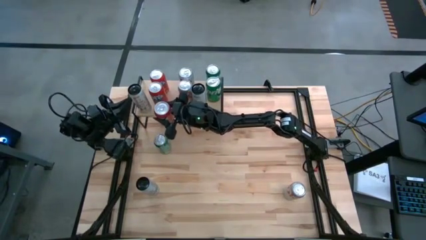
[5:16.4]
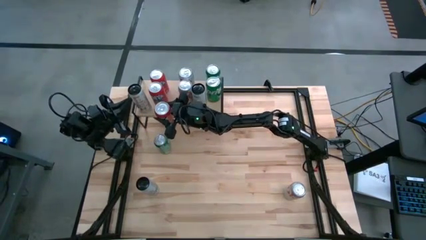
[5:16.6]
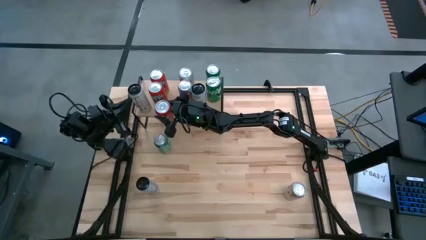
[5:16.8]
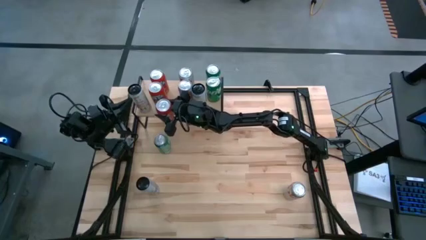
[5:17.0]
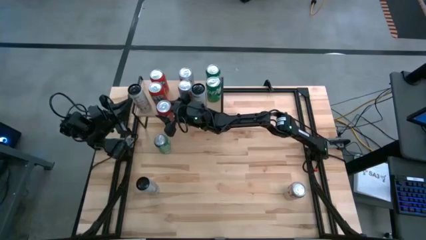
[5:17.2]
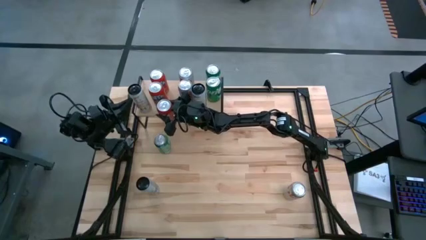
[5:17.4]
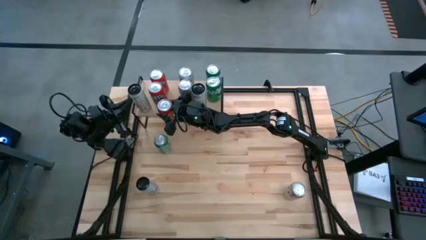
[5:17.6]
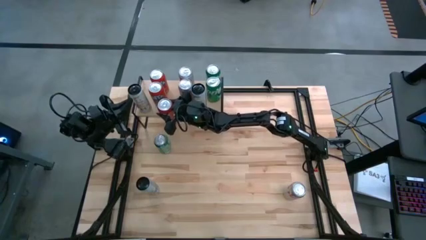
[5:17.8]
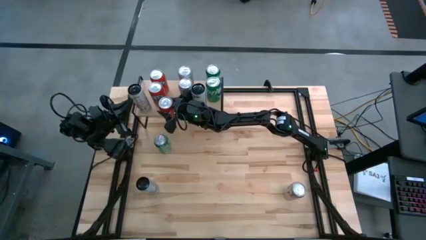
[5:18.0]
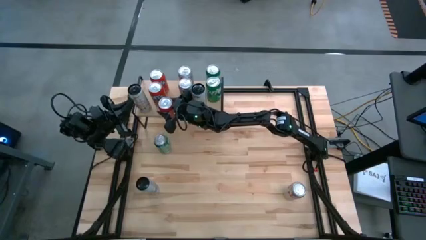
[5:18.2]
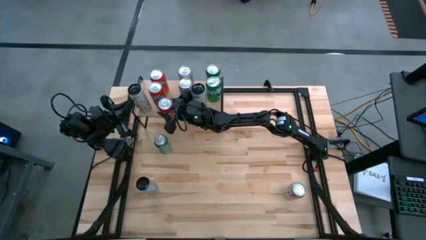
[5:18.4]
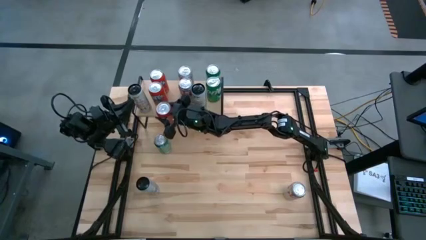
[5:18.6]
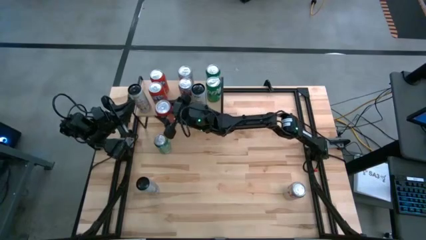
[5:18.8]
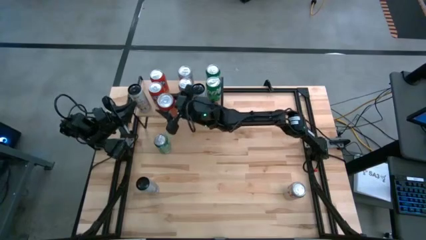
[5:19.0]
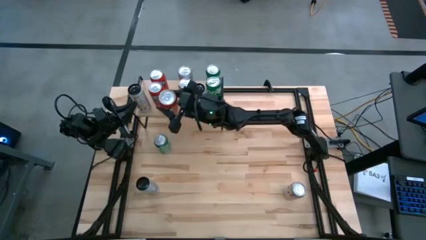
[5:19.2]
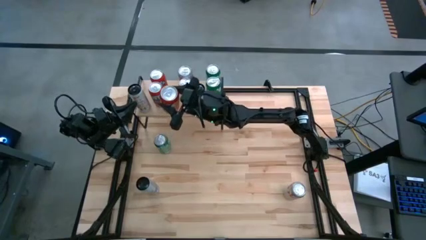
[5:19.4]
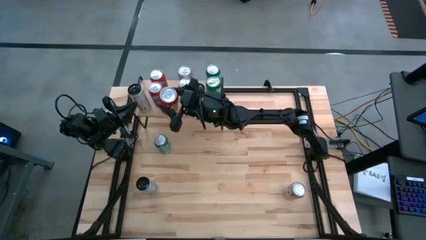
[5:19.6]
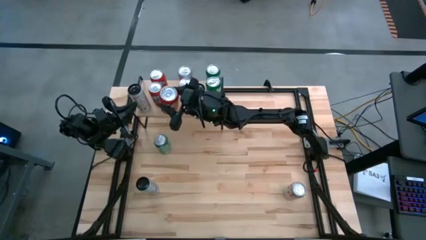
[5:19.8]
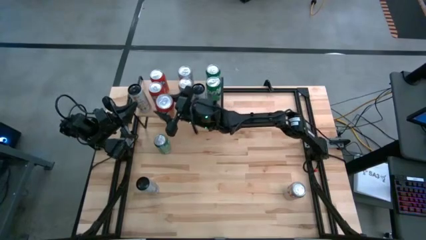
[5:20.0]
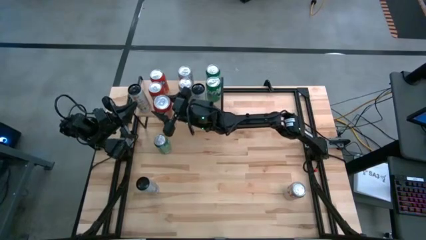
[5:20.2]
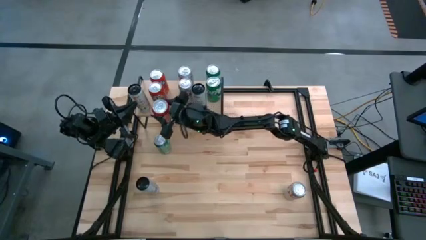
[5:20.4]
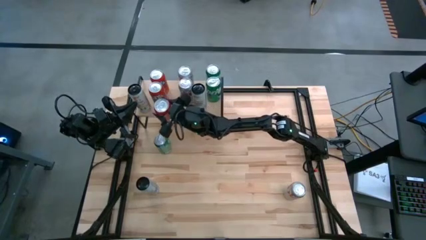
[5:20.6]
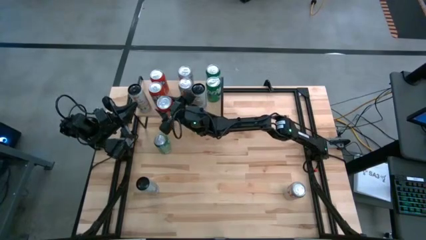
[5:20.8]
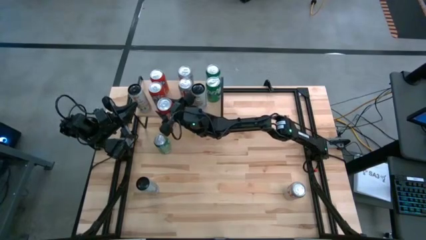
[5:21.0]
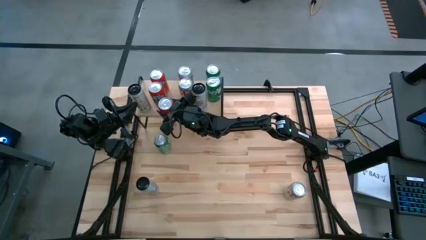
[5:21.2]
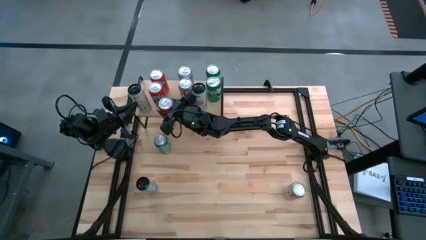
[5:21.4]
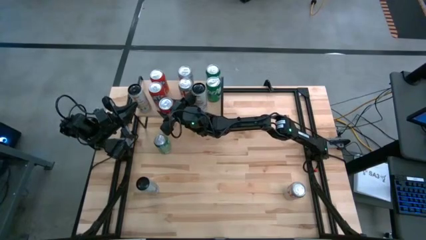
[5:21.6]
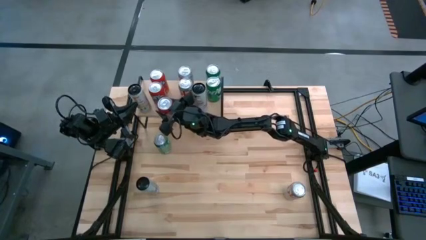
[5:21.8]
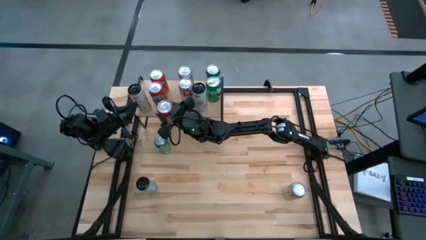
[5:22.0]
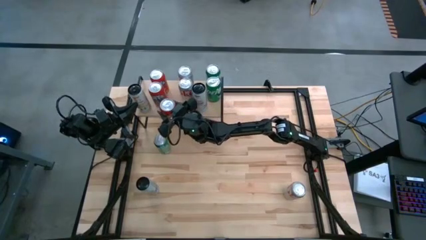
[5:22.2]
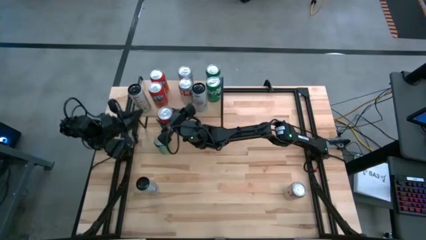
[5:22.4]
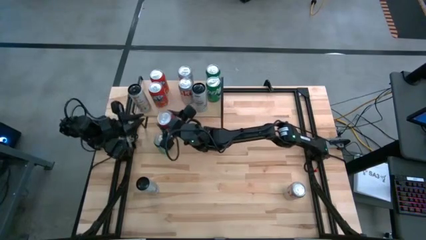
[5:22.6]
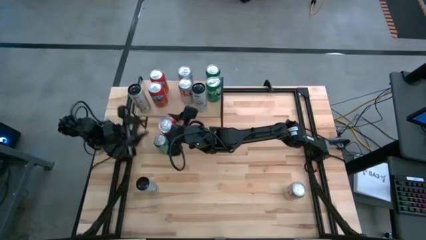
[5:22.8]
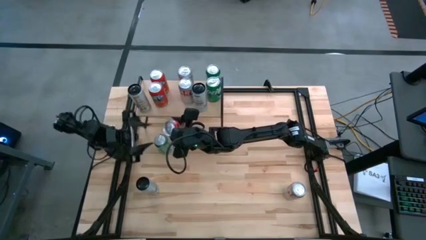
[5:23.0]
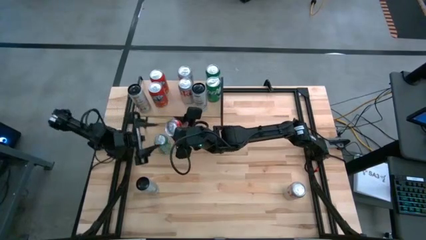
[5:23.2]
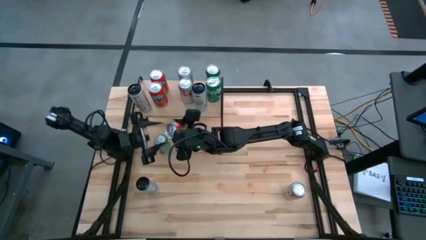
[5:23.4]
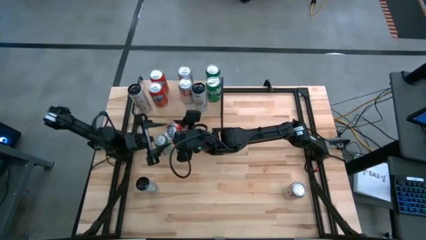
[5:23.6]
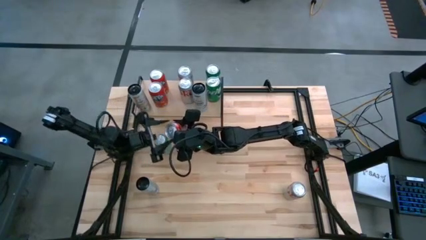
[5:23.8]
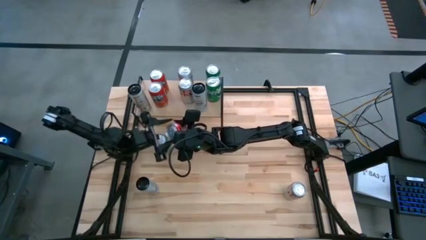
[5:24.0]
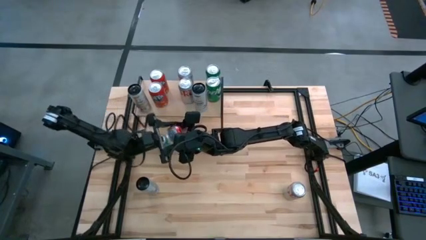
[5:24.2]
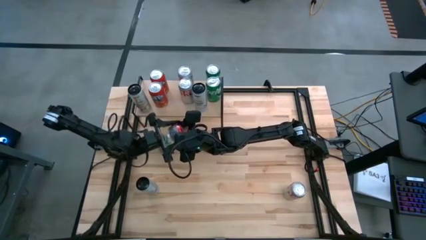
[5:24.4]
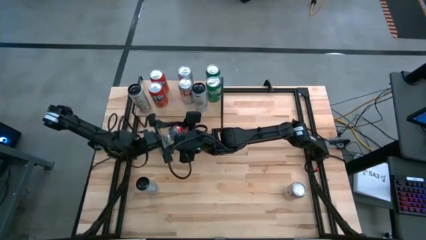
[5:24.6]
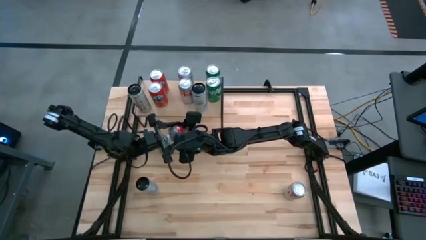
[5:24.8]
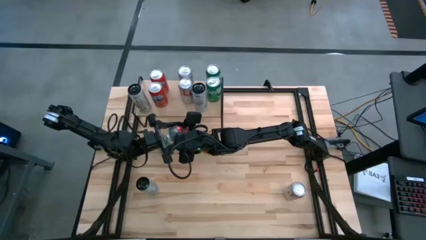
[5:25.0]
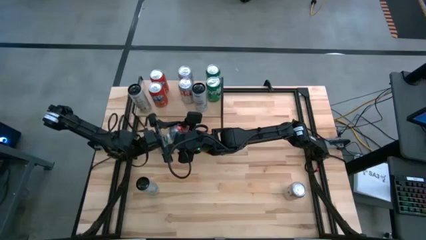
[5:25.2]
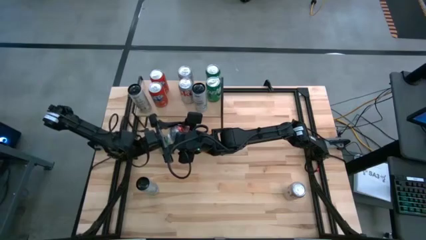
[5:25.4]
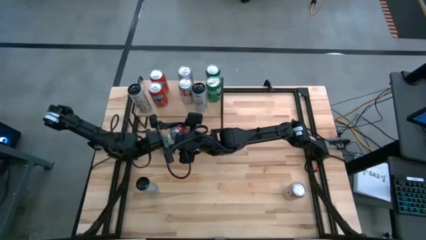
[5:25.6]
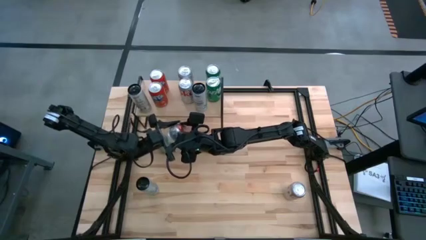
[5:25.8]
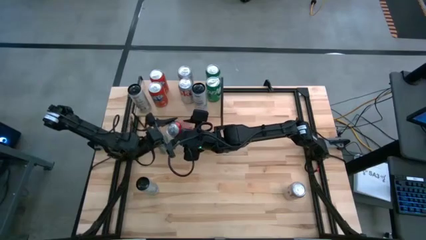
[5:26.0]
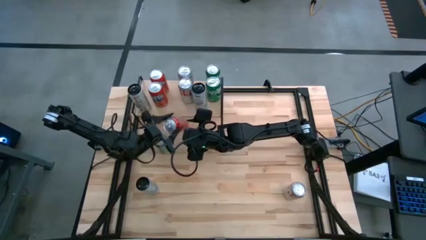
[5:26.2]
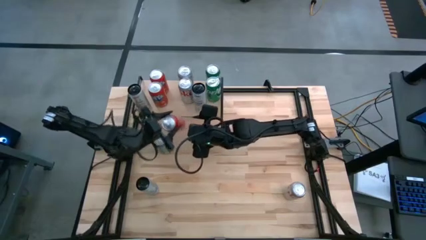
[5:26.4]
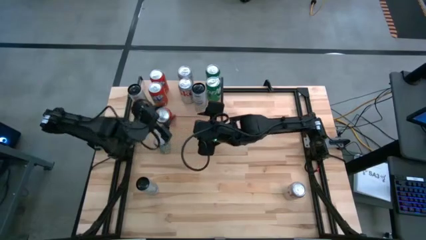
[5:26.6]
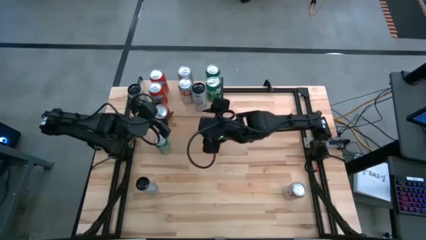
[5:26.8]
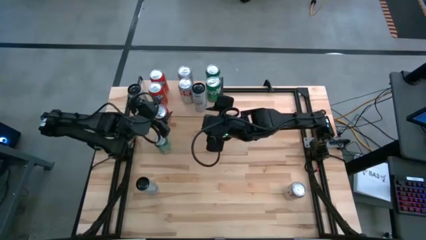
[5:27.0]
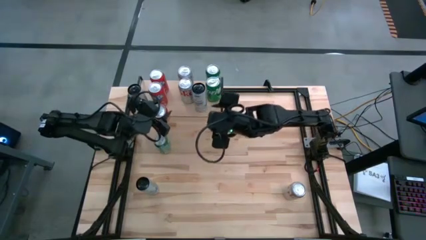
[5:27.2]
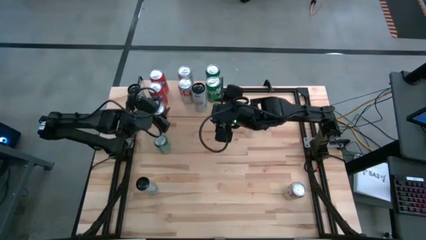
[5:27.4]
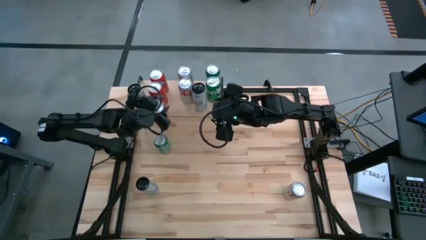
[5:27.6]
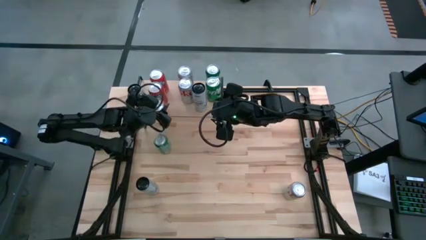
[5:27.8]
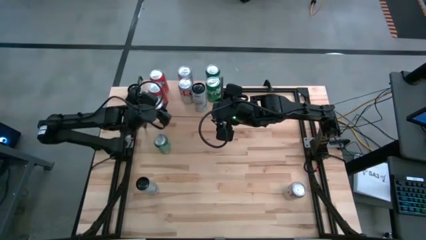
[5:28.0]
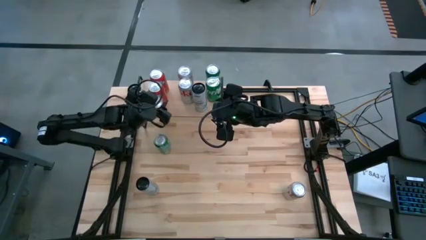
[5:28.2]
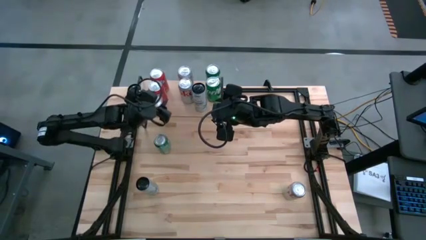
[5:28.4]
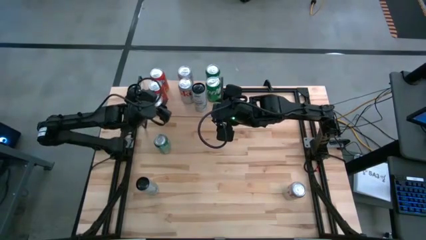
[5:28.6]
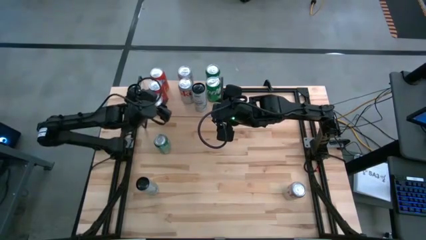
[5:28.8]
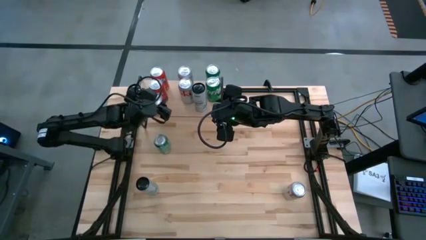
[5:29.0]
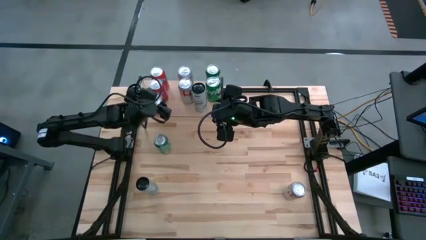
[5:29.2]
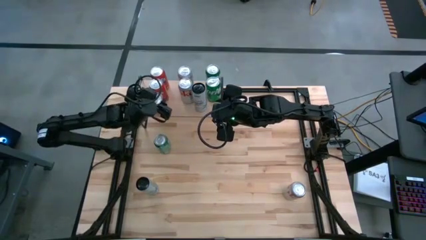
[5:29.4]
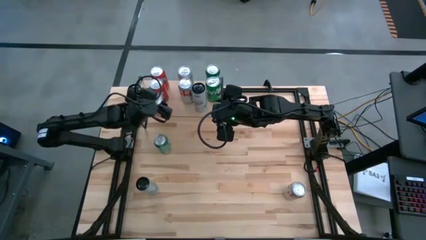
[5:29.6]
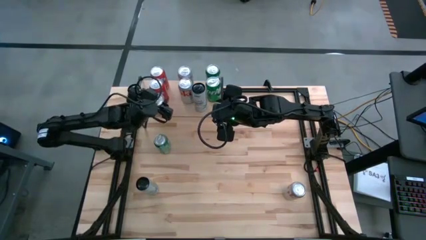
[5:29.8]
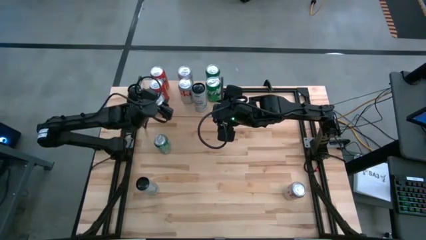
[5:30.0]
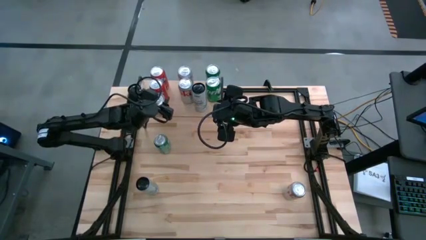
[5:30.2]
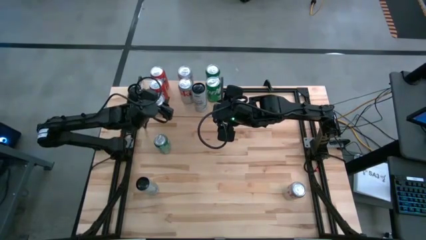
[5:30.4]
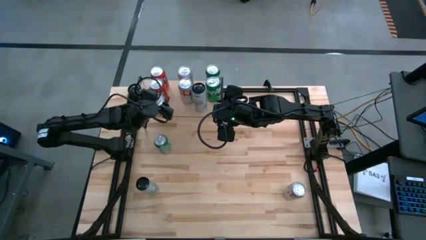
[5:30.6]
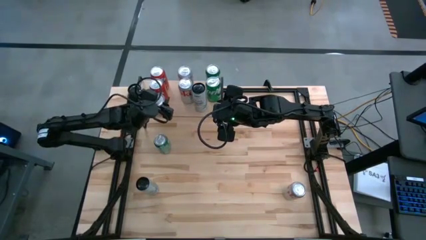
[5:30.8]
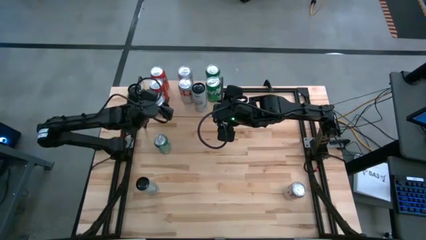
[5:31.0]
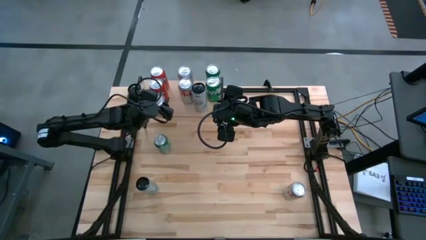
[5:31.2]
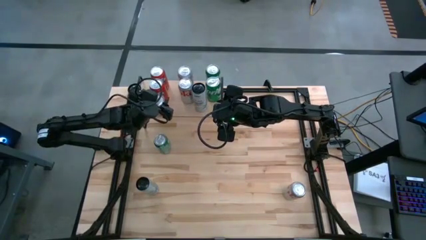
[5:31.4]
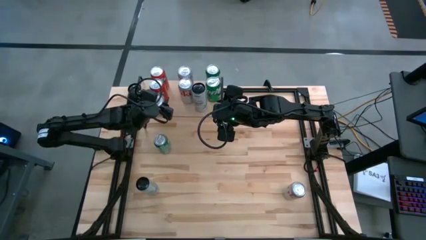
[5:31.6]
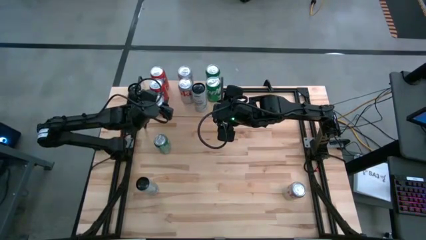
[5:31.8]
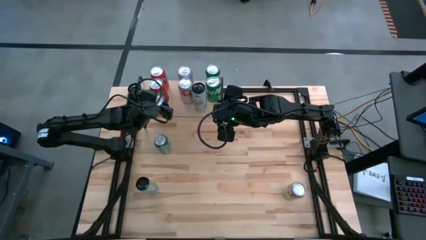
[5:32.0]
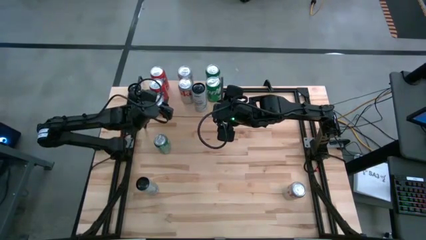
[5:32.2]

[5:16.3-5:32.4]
Task: Place canned beverage on shelf
Put the red soda can aligned with the other red soda cans on the shelf
